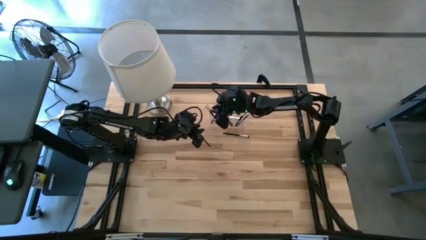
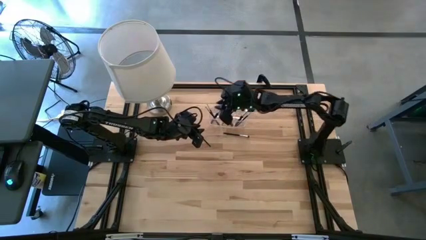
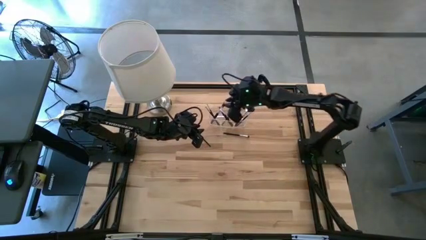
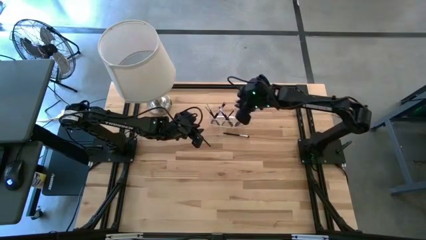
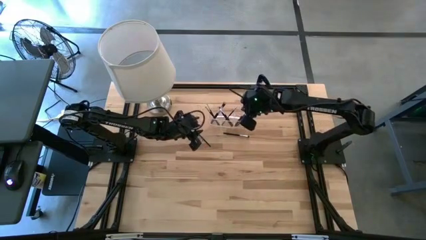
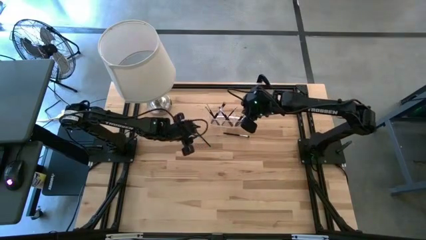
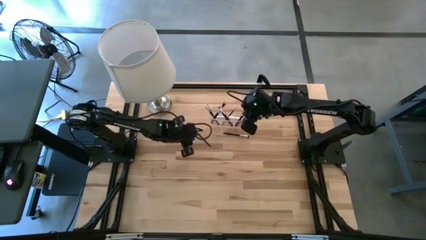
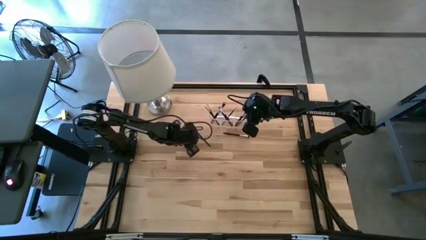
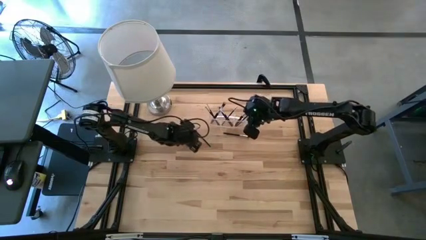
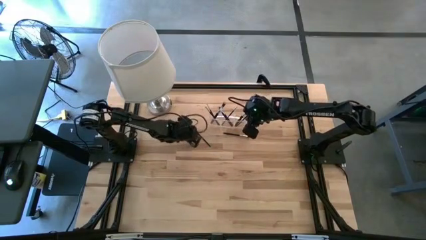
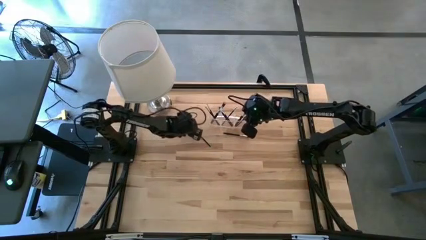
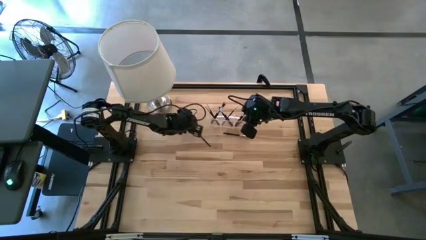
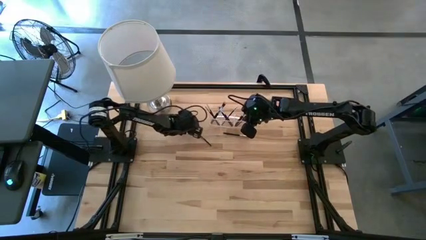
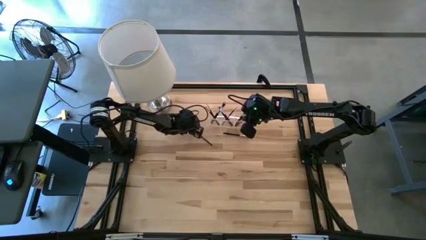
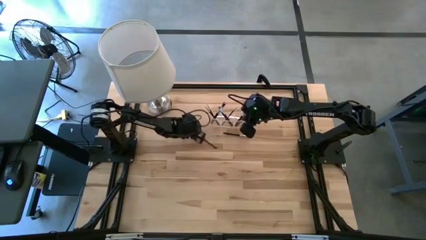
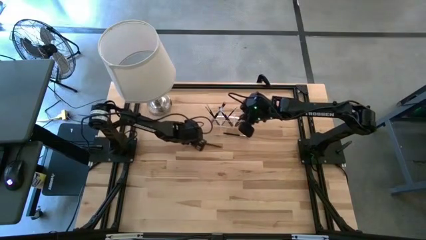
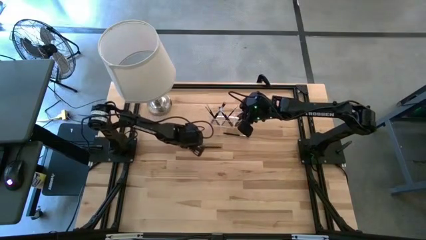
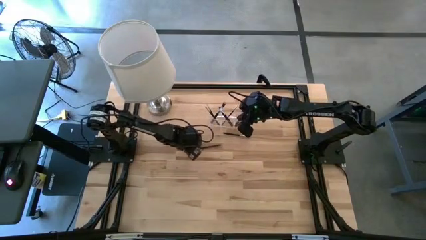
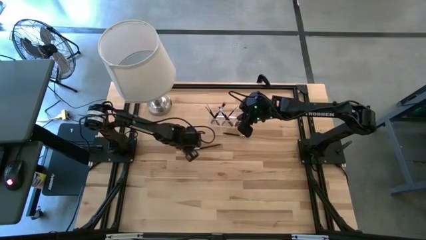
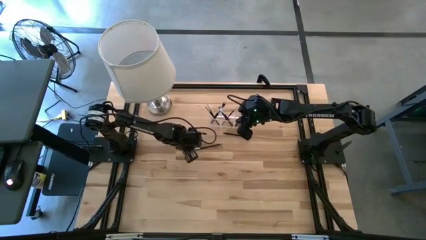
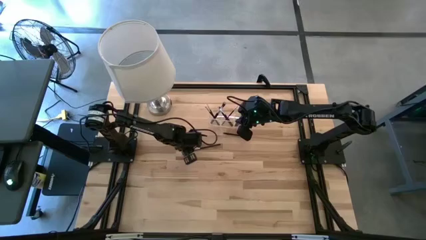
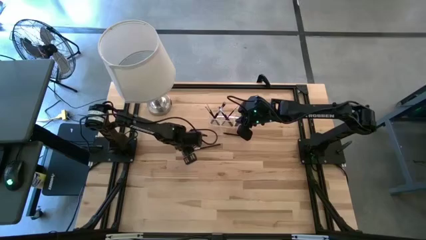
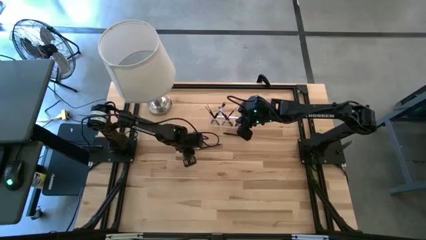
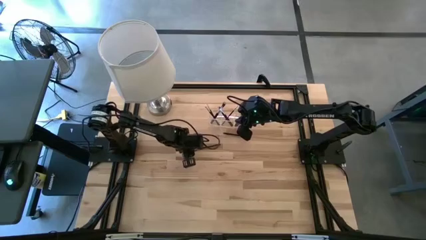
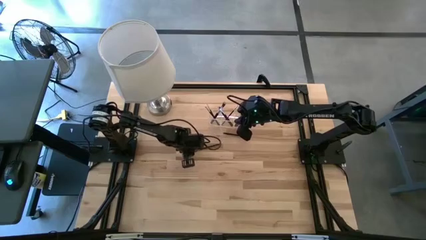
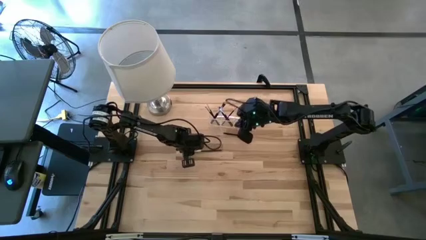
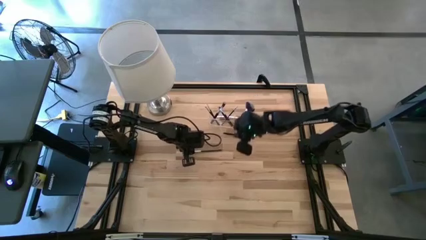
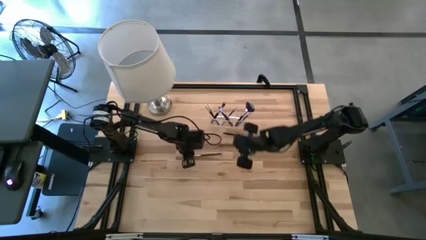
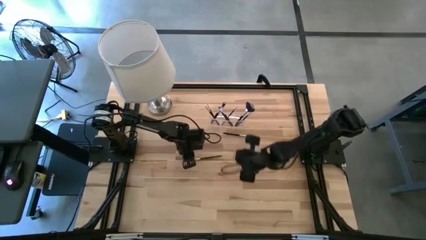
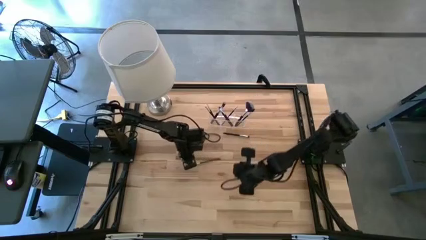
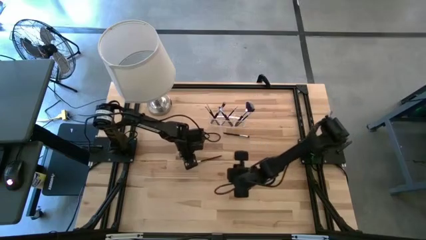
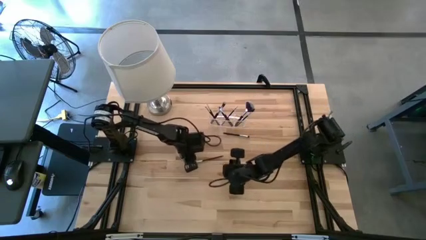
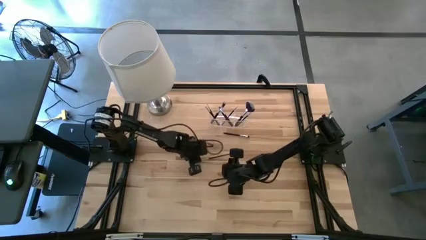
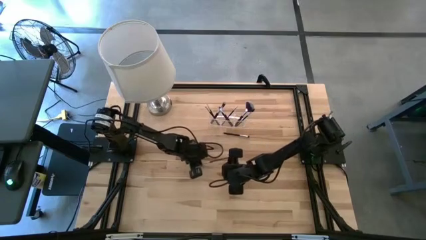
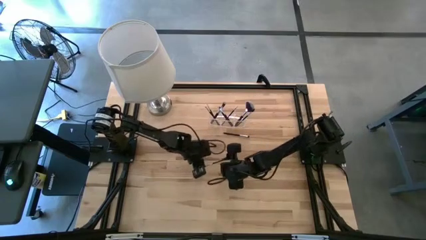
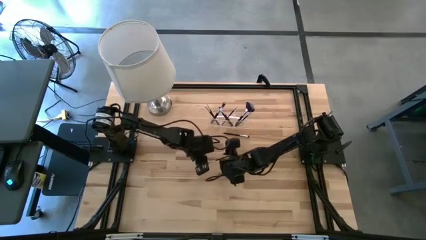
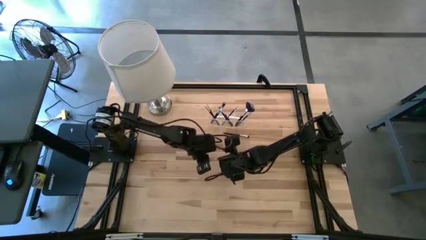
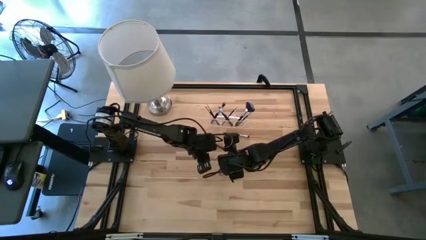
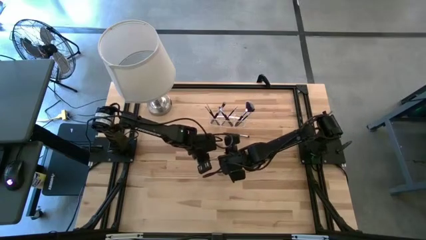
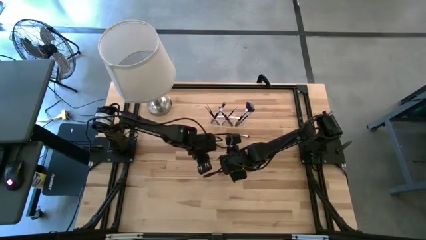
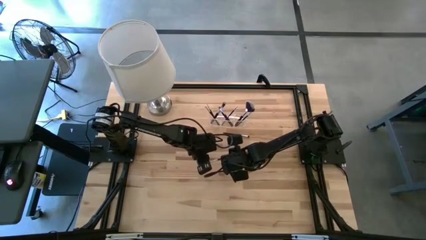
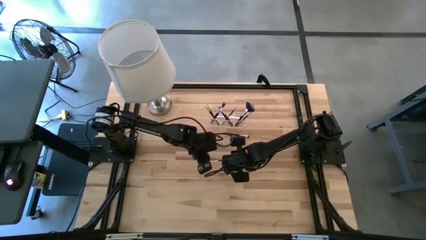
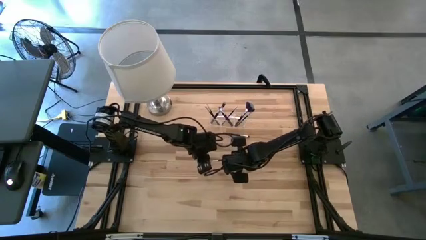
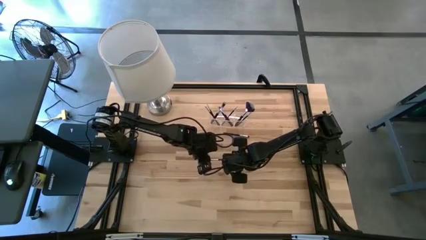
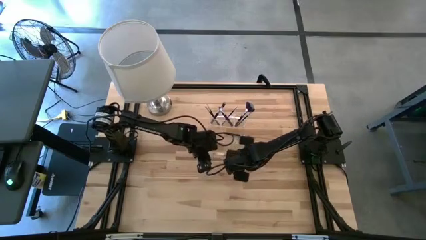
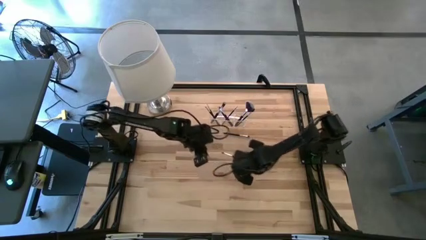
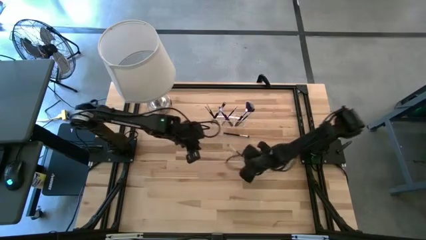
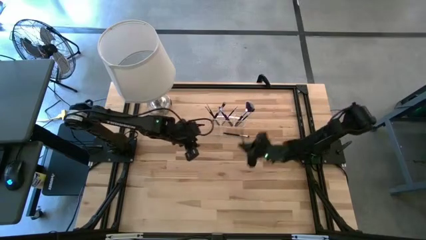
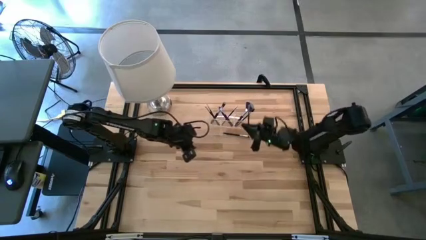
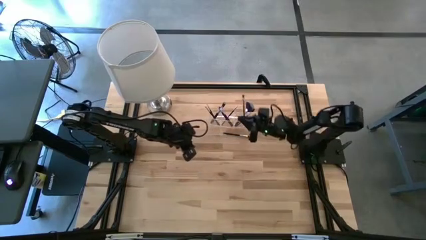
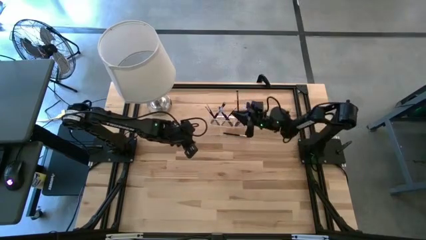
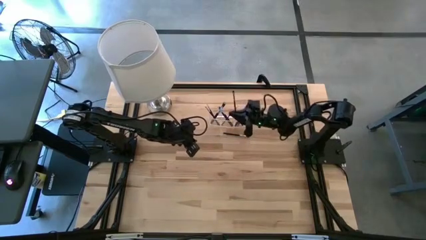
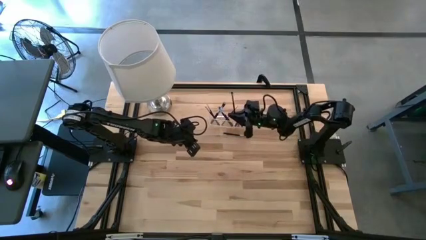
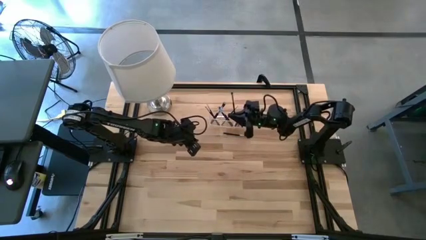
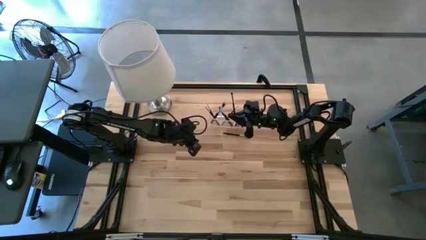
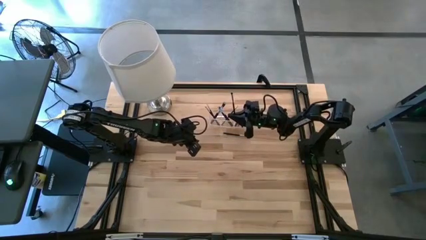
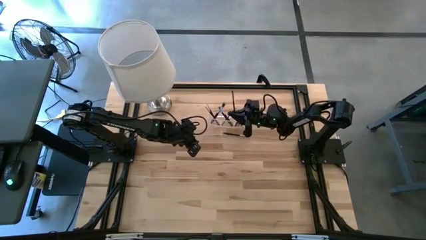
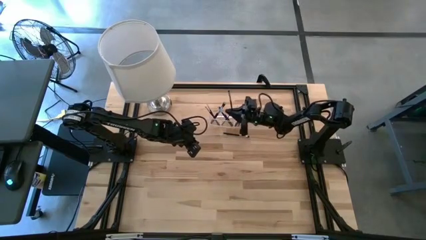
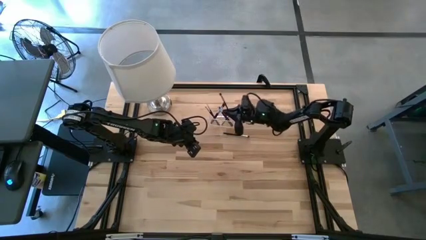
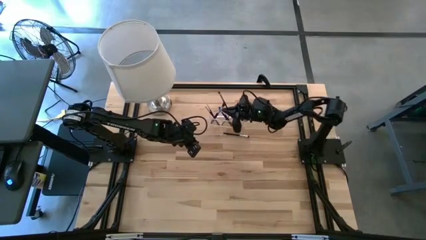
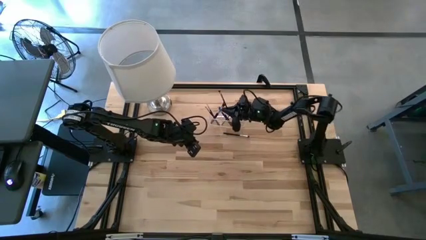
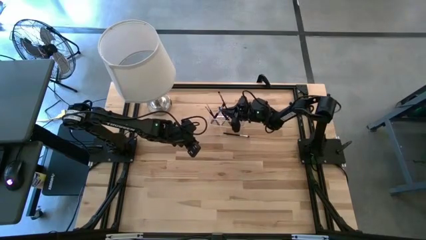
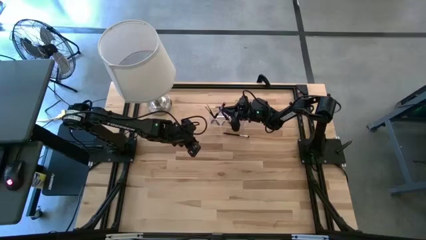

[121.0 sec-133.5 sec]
Task: Put items in baskets/containers
Put the eyeshadow brush into the transparent organizer

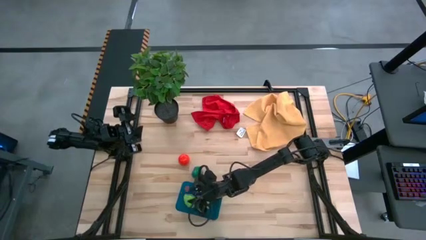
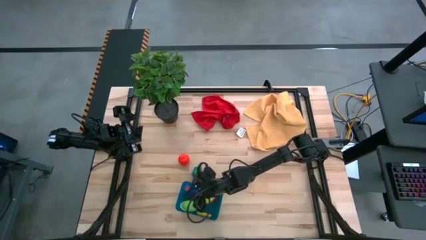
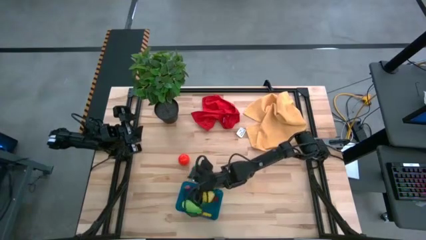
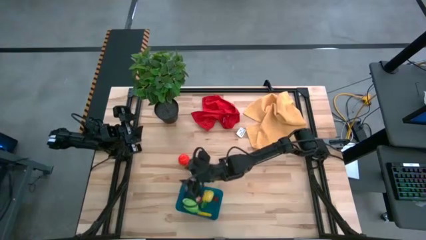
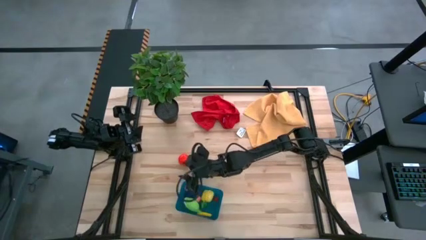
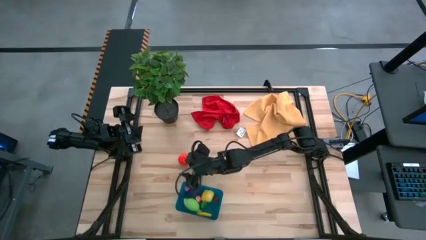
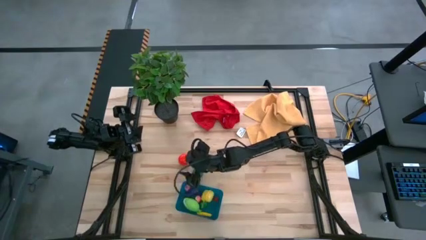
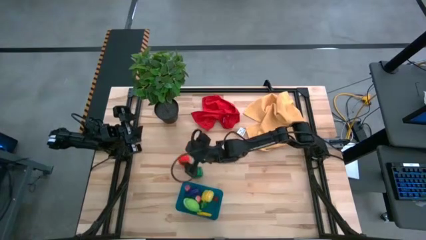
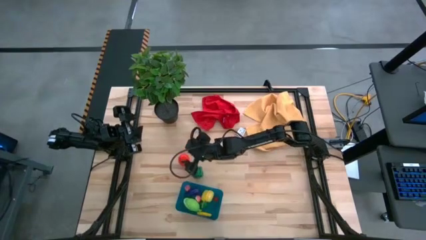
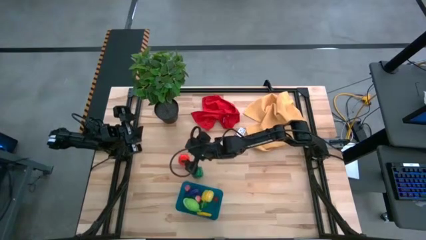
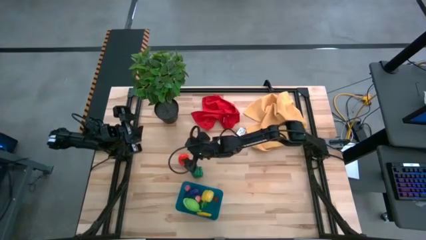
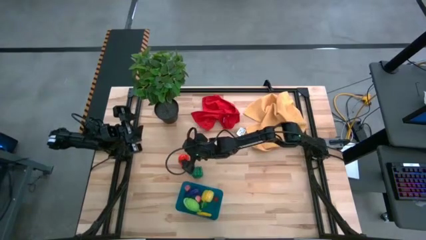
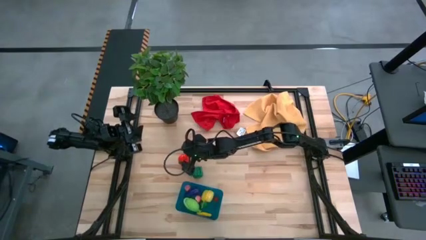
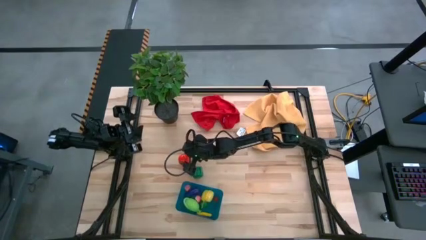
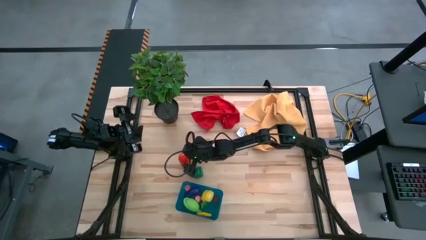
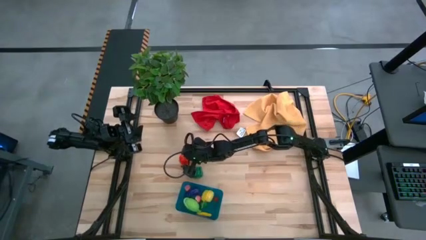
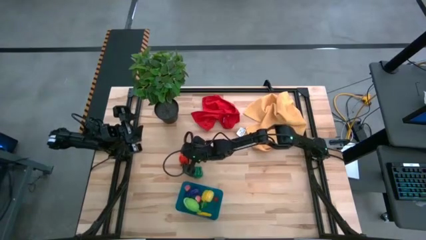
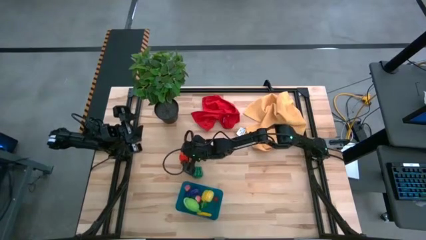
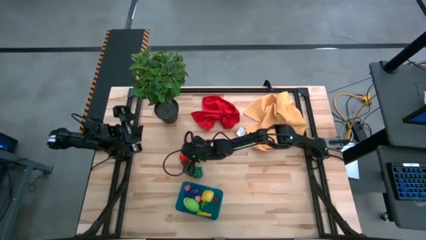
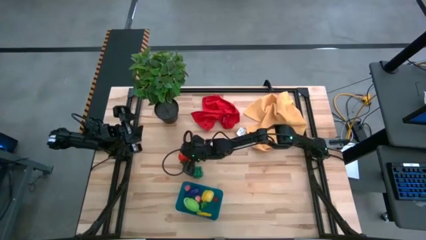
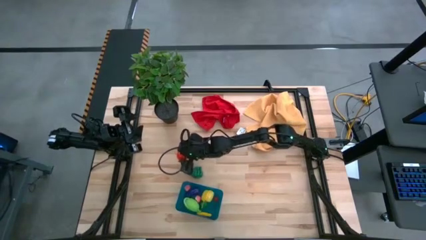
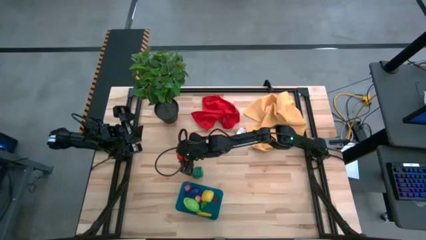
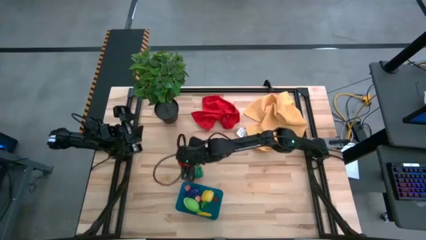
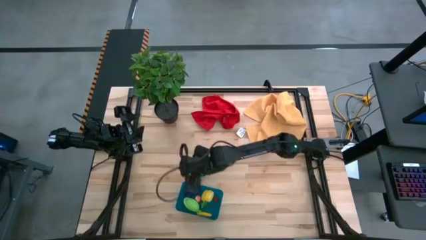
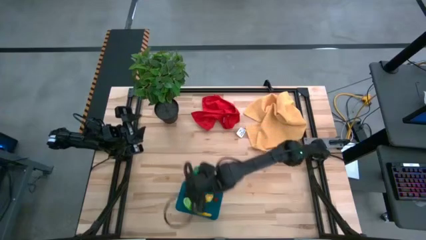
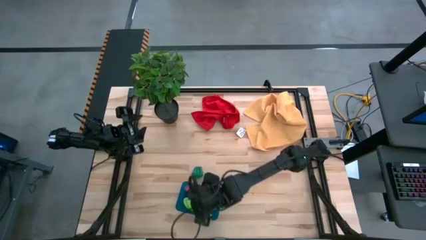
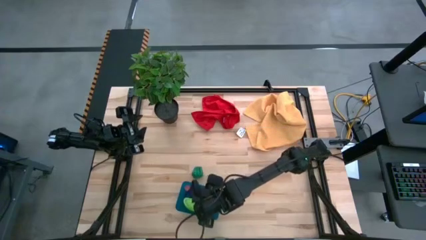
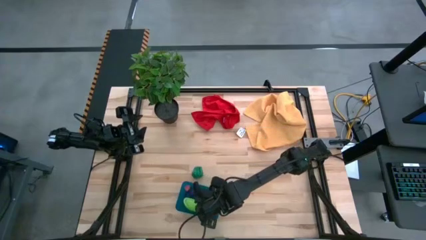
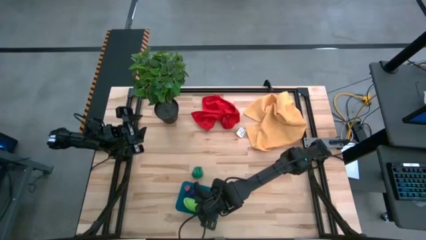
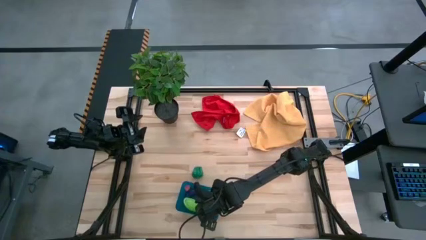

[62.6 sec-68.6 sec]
Task: Pick and placing Produce into tupperware
Put the red tomato into the blue basket
